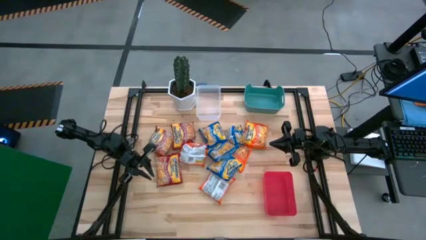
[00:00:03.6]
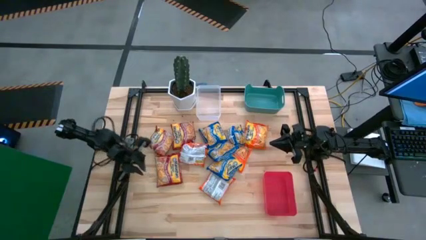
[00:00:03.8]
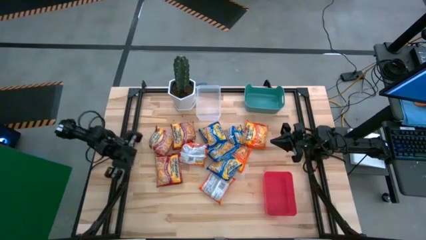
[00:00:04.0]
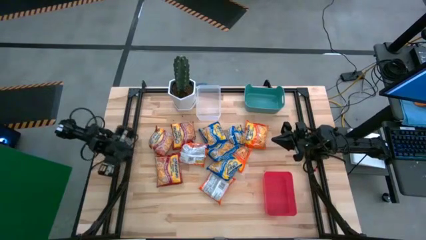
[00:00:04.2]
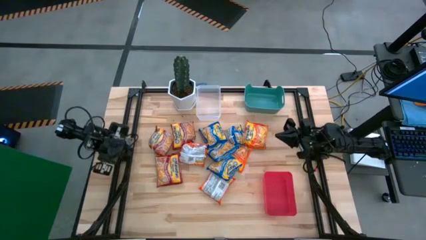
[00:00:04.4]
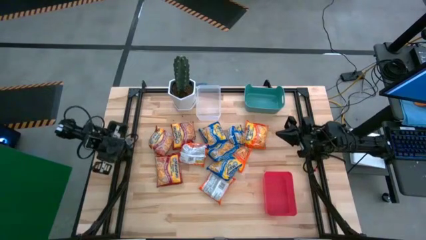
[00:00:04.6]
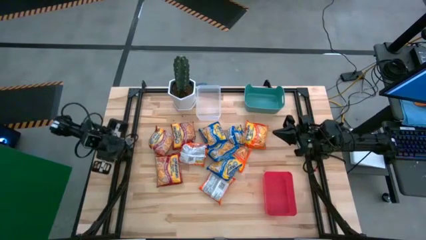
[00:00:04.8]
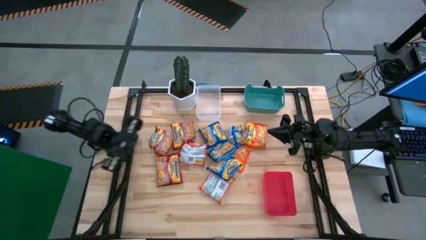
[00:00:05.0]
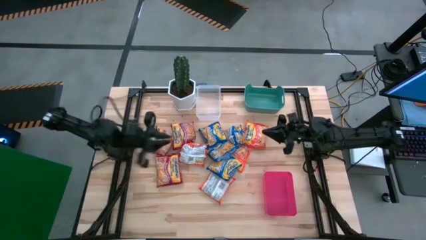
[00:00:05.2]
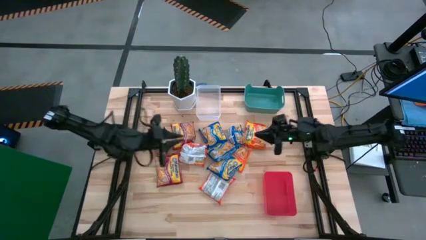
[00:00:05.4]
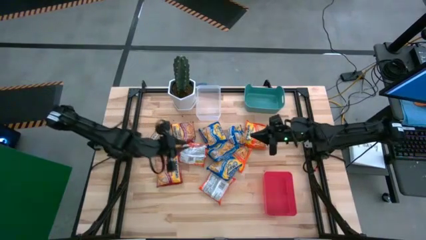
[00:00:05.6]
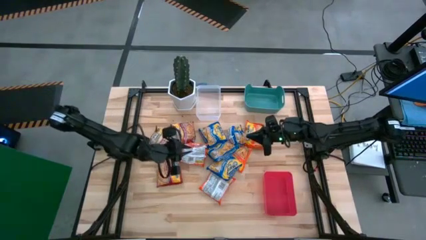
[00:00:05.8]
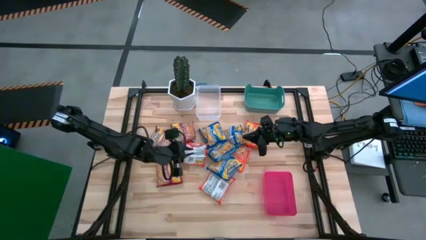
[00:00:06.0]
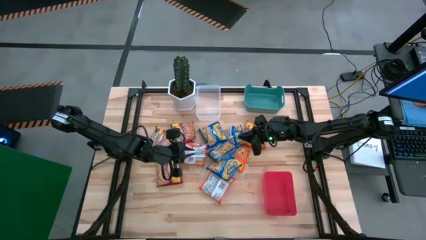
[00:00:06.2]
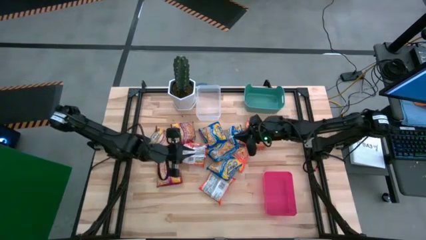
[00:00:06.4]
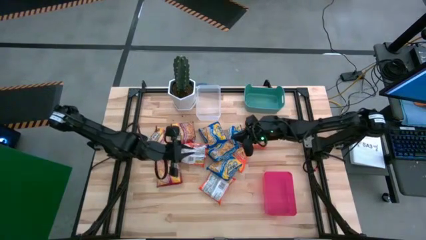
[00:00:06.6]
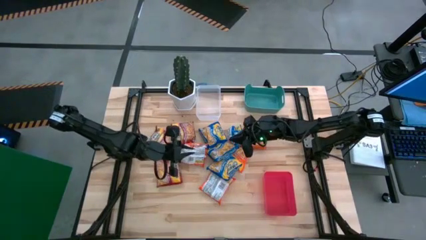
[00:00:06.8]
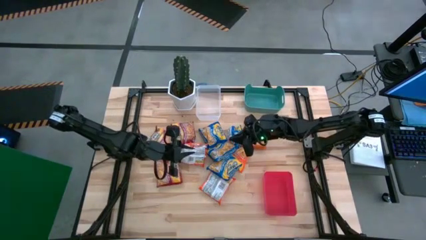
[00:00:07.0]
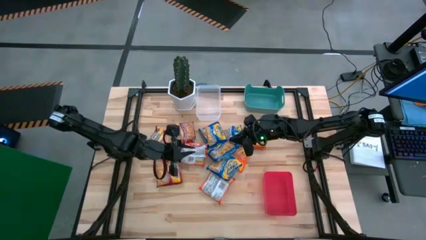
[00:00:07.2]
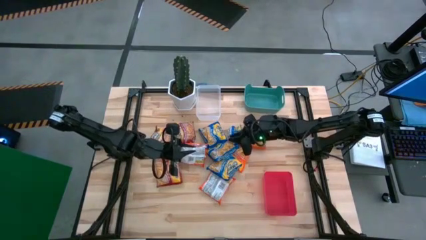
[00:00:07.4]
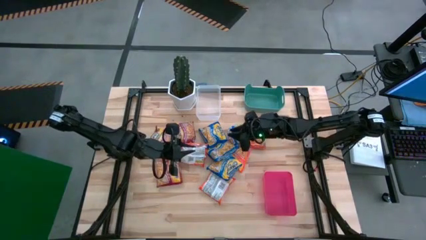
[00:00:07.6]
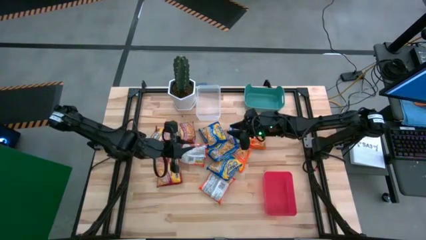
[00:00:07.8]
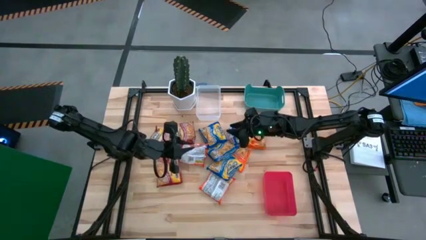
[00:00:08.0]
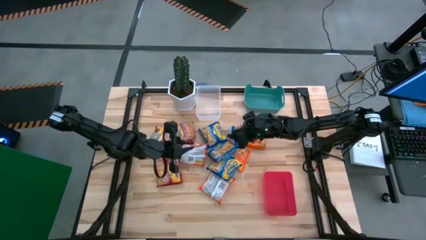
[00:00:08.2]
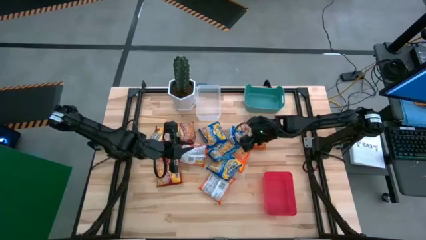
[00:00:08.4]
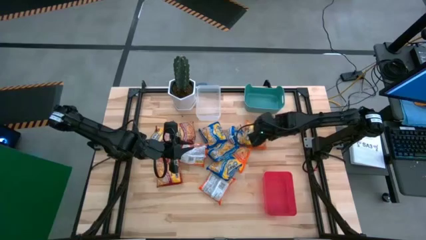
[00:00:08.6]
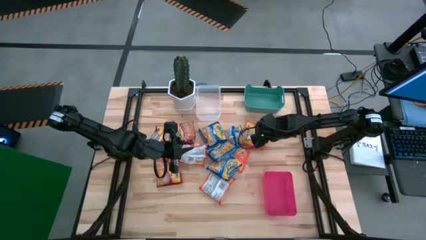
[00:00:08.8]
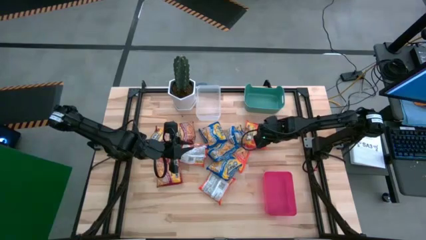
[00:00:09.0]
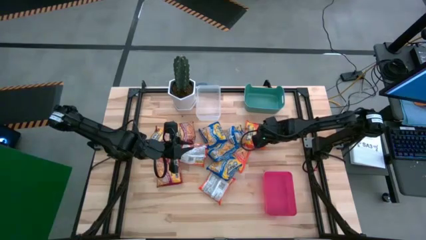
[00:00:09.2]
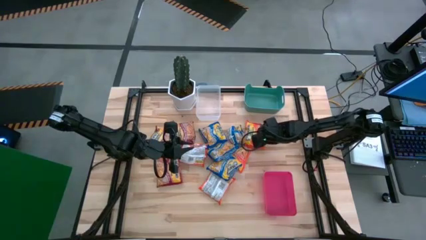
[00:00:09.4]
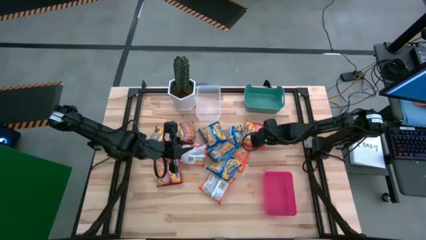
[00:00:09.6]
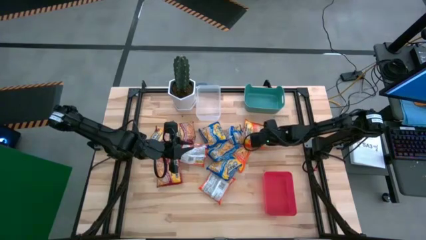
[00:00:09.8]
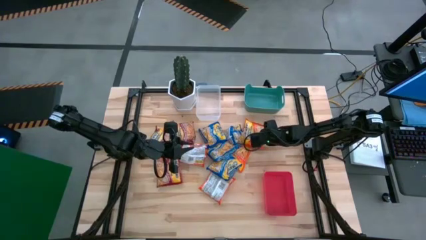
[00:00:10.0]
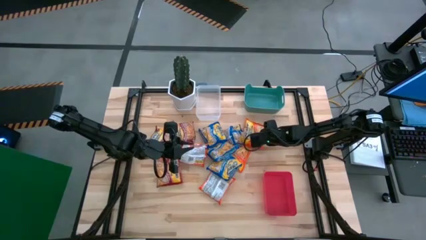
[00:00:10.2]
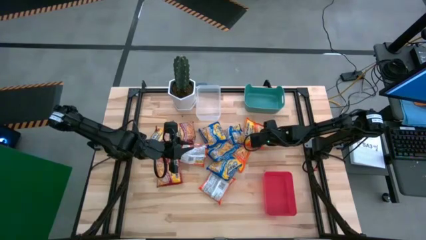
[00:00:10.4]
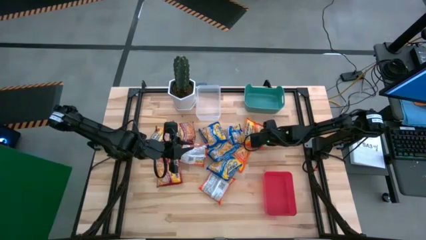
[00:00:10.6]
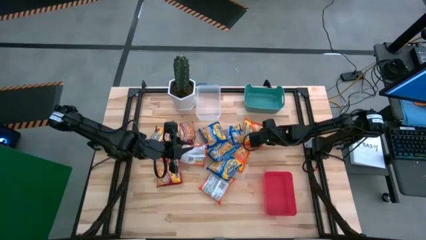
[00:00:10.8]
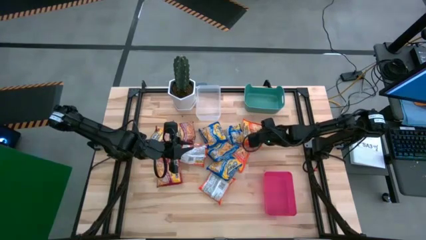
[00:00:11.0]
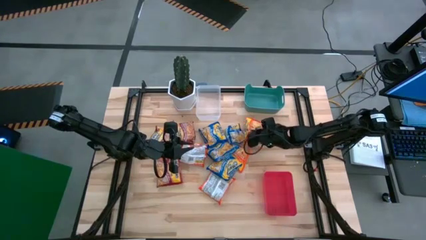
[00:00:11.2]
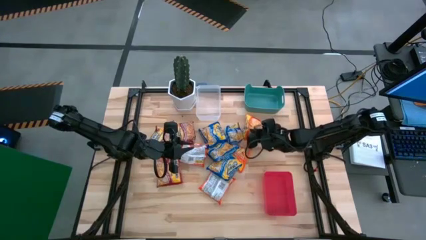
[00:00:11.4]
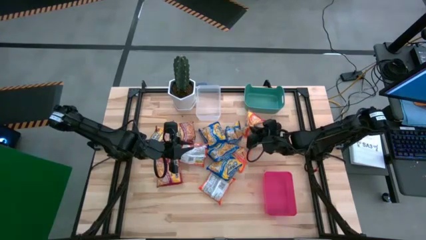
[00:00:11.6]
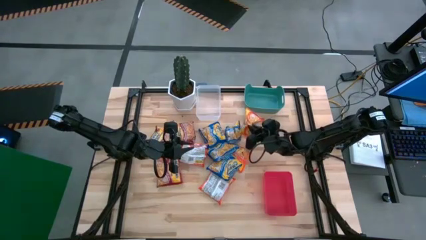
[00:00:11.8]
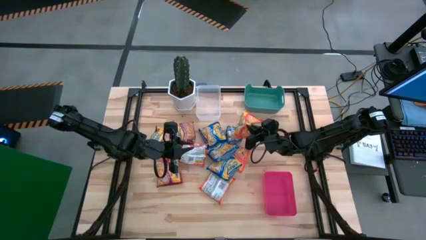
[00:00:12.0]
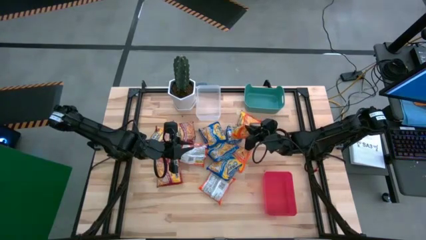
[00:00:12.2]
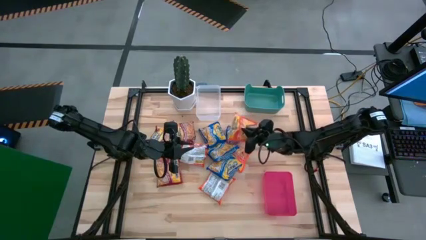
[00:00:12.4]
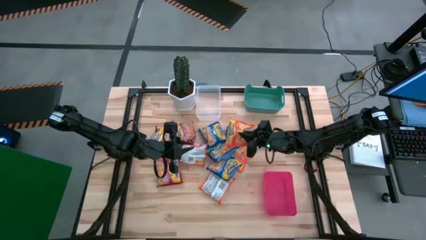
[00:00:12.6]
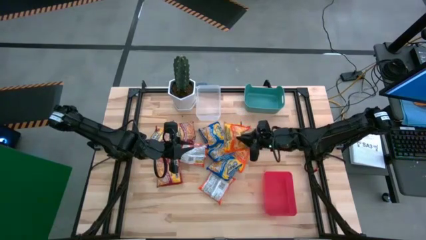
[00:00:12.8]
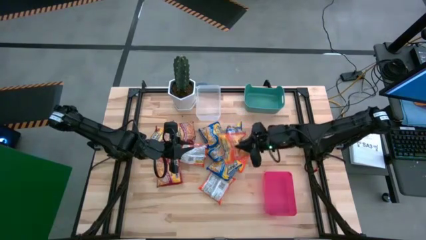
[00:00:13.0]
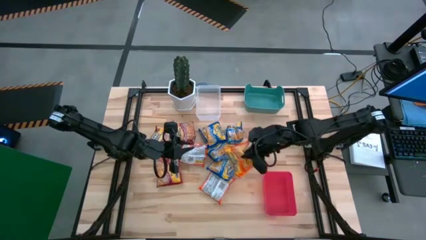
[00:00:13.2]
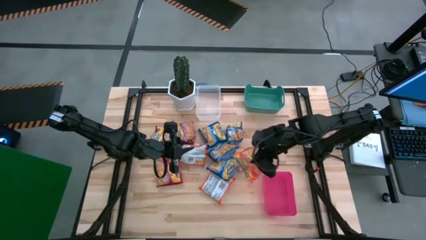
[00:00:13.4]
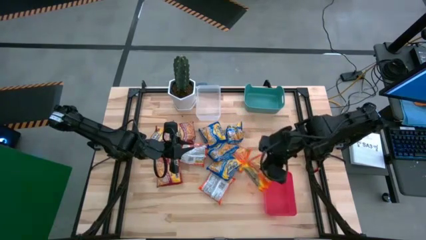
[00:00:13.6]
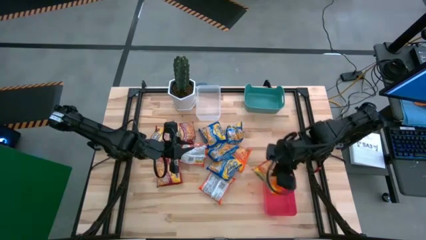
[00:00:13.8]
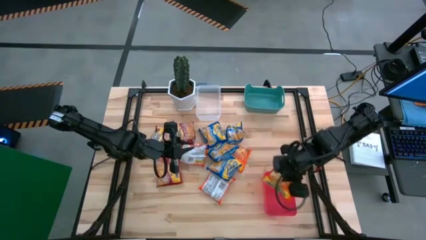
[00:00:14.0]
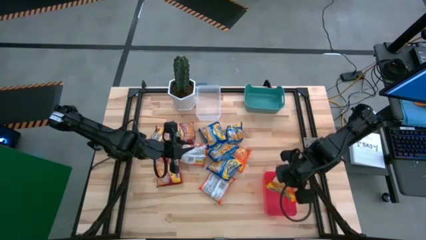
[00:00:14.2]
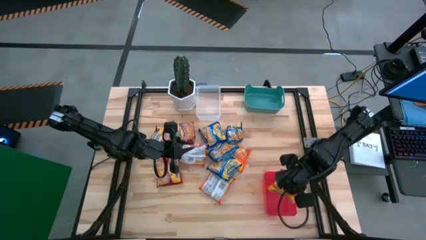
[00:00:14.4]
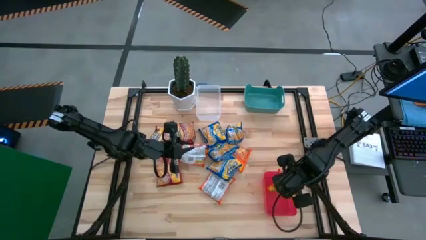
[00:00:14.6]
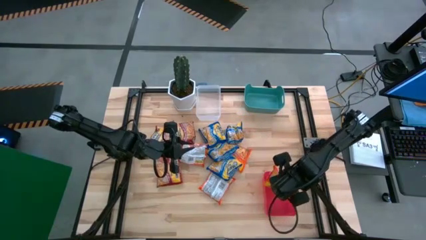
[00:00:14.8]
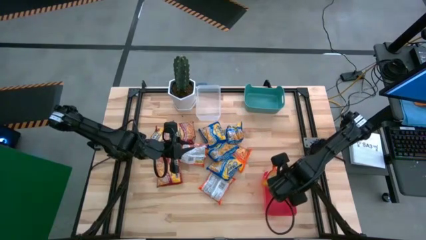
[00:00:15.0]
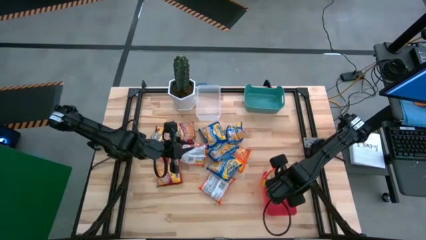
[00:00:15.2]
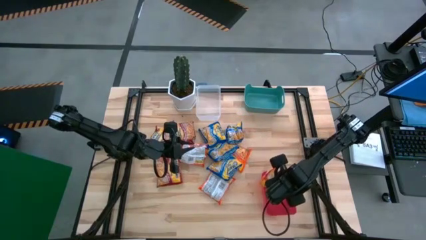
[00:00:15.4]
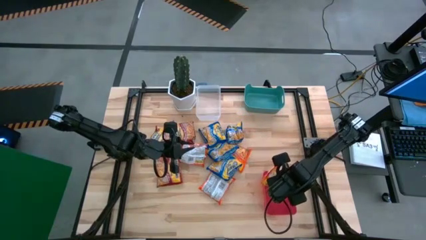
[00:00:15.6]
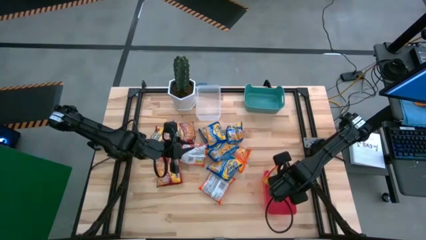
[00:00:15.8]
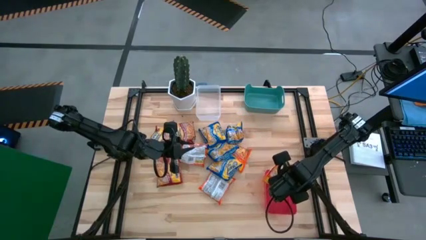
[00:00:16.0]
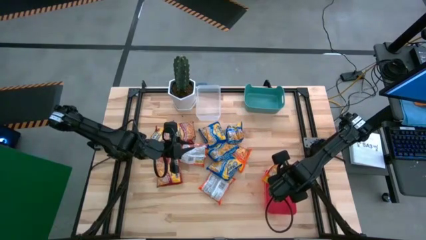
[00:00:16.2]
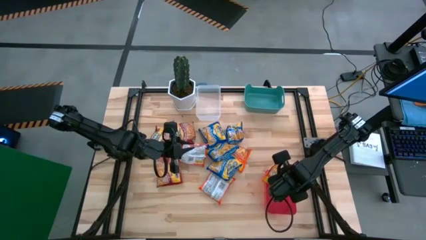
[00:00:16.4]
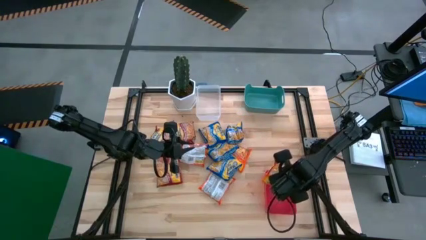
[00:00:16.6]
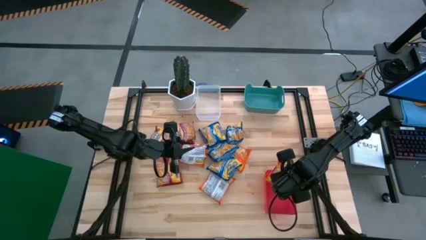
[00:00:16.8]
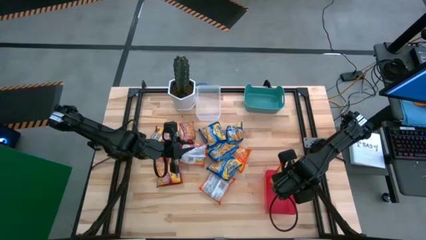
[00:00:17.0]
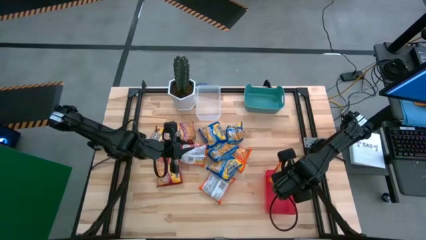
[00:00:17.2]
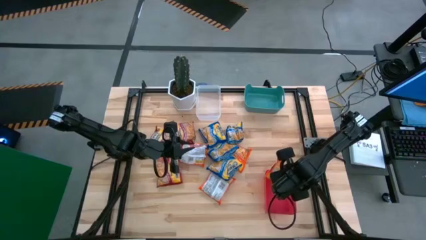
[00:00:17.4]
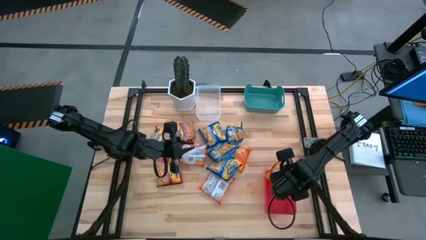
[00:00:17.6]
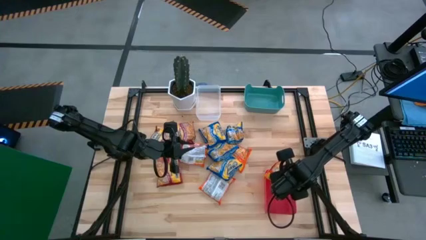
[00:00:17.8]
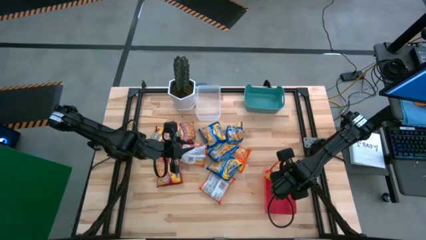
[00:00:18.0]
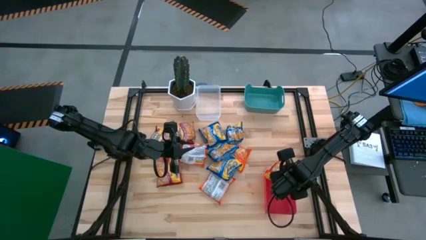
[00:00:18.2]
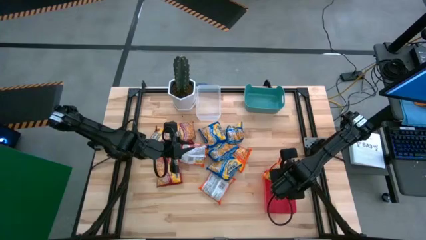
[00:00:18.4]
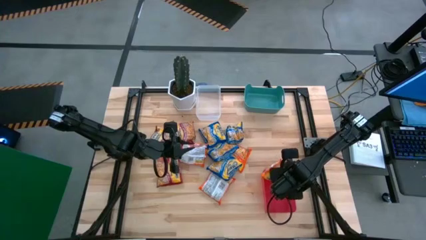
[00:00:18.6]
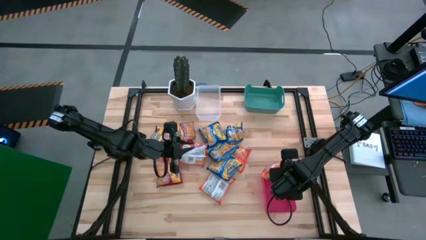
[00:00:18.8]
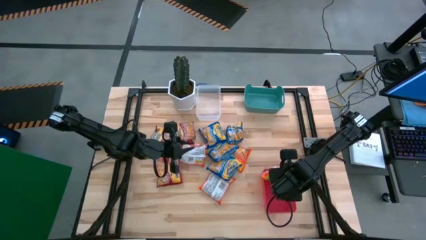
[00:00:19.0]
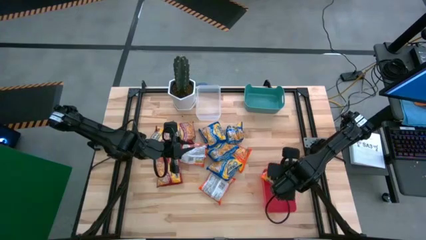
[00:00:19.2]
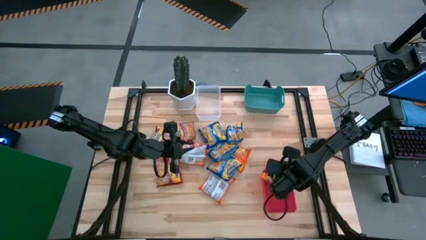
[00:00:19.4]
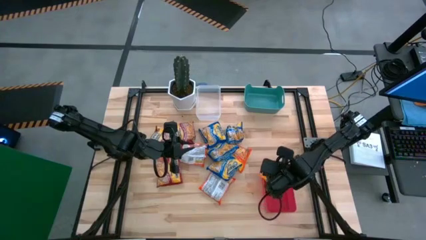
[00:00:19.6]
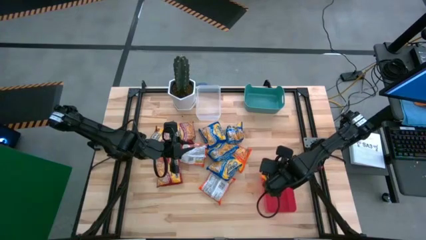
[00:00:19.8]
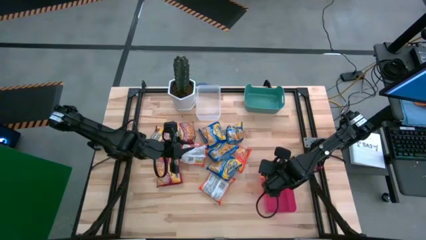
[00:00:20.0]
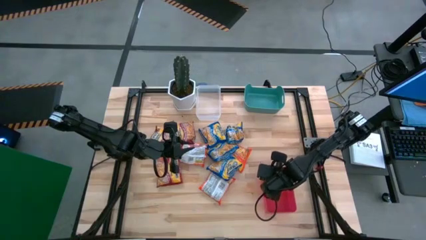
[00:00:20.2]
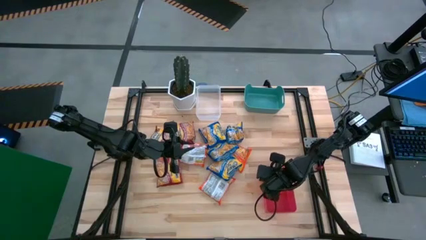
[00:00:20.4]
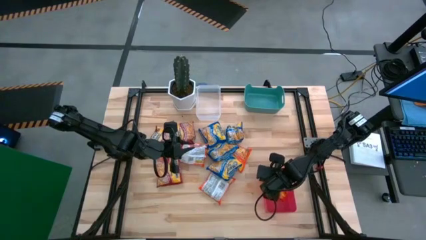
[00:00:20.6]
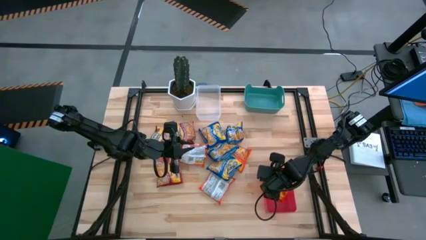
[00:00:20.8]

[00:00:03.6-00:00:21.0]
Task: Sort Maruchan noodles
Put the orange noodle pack into the transparent bin
